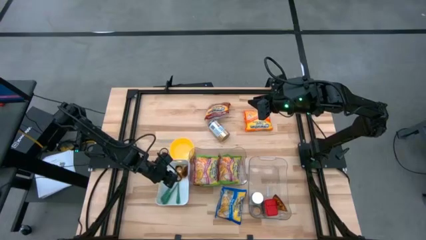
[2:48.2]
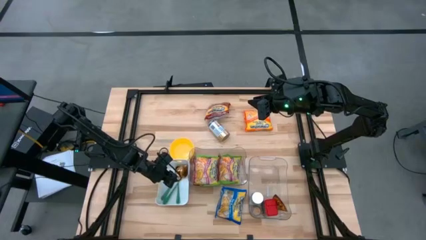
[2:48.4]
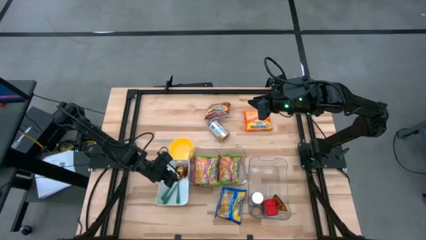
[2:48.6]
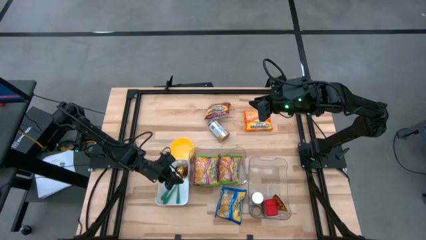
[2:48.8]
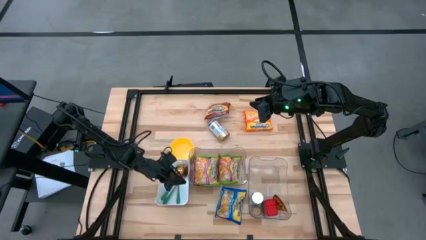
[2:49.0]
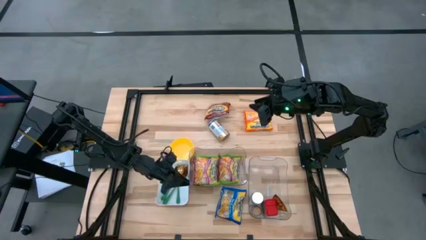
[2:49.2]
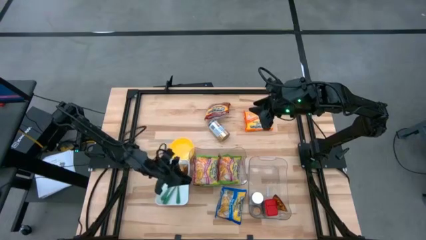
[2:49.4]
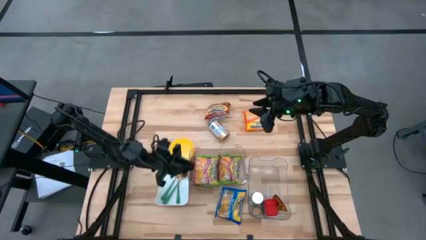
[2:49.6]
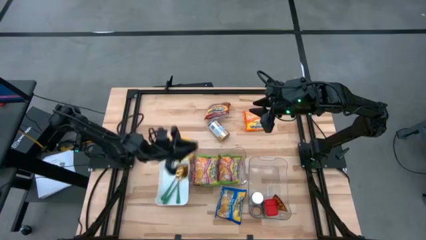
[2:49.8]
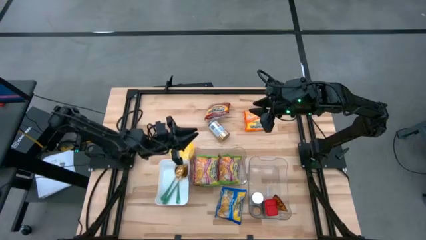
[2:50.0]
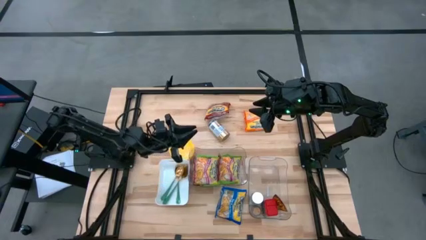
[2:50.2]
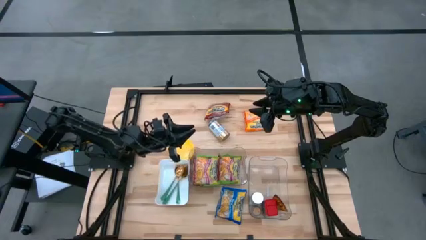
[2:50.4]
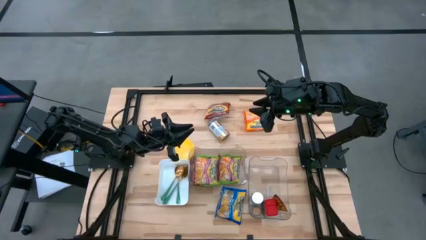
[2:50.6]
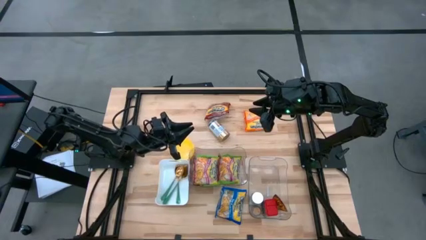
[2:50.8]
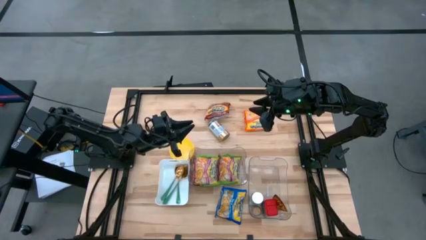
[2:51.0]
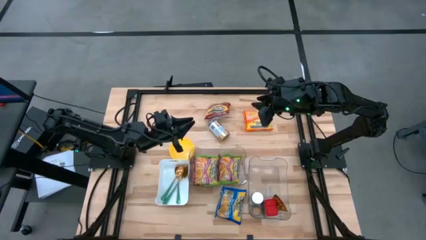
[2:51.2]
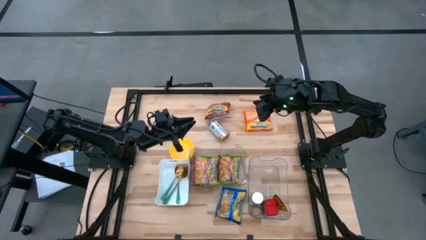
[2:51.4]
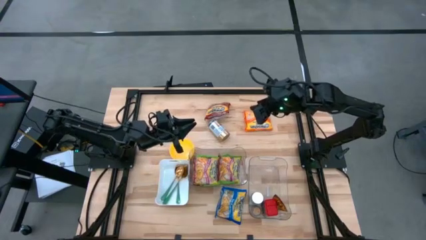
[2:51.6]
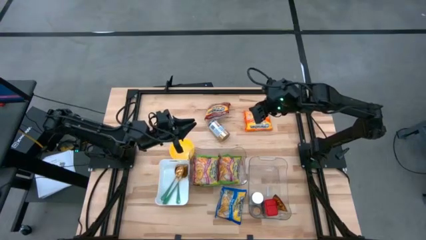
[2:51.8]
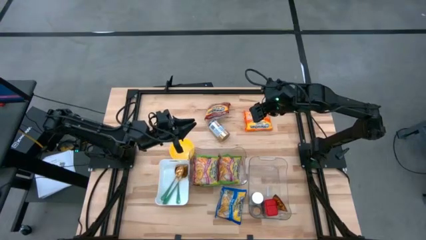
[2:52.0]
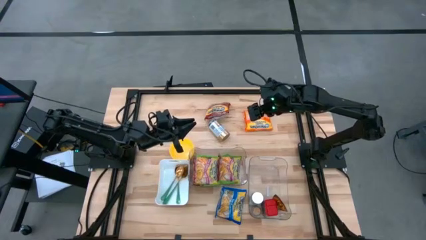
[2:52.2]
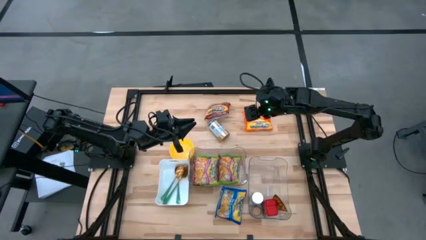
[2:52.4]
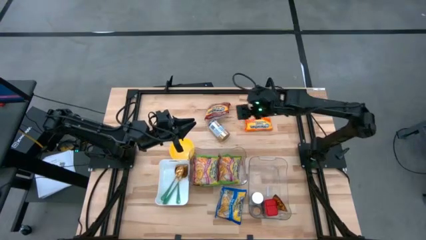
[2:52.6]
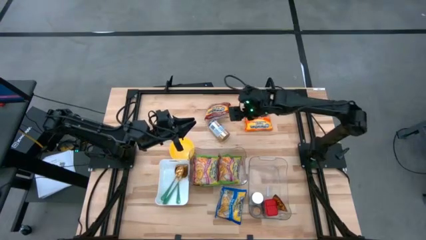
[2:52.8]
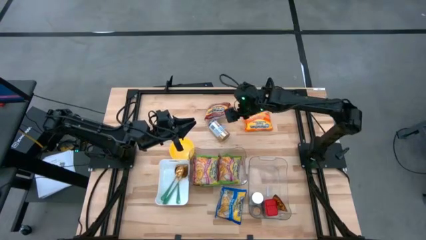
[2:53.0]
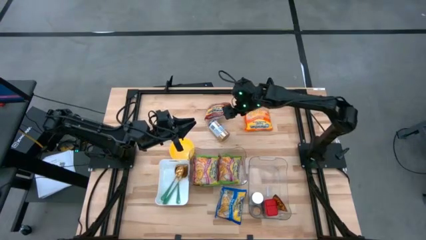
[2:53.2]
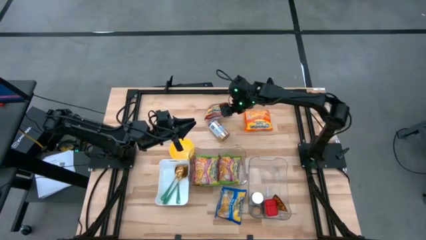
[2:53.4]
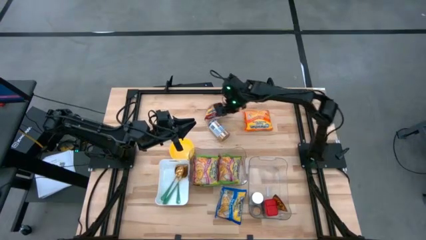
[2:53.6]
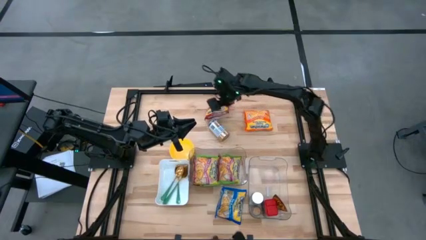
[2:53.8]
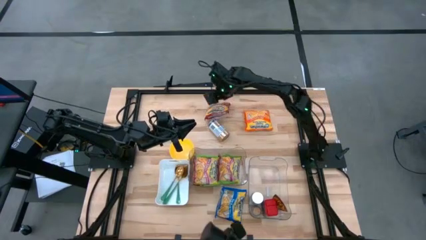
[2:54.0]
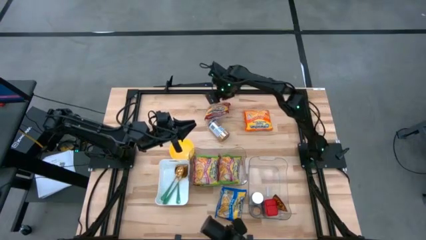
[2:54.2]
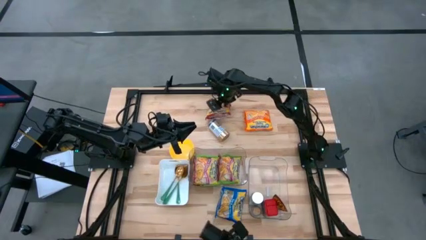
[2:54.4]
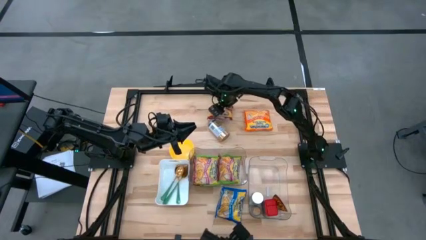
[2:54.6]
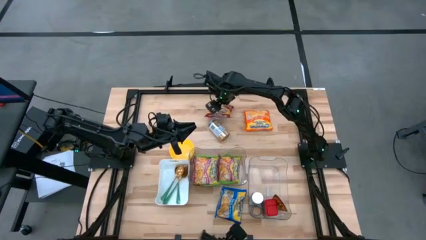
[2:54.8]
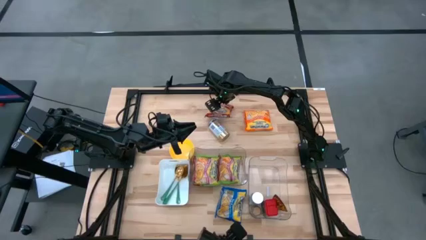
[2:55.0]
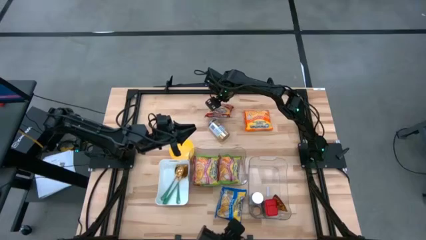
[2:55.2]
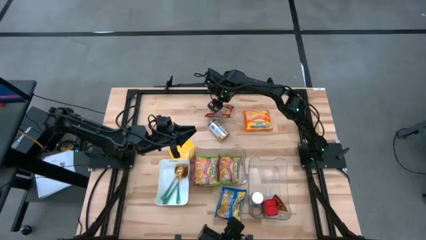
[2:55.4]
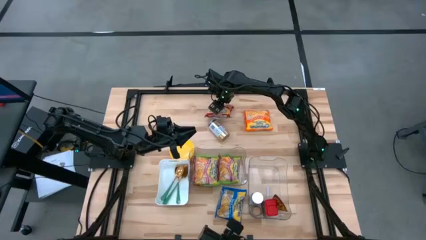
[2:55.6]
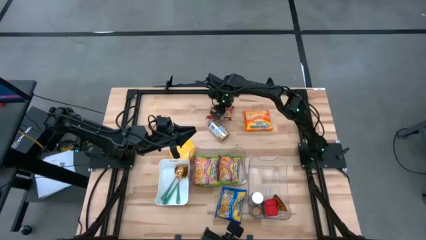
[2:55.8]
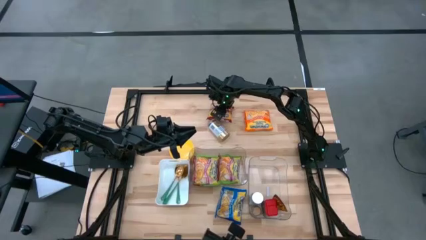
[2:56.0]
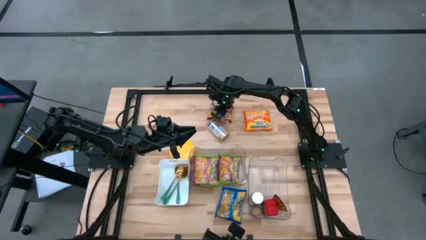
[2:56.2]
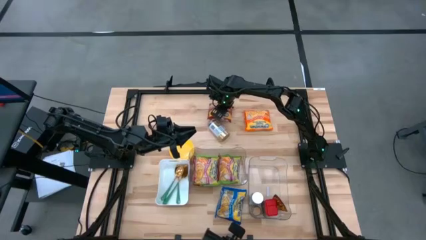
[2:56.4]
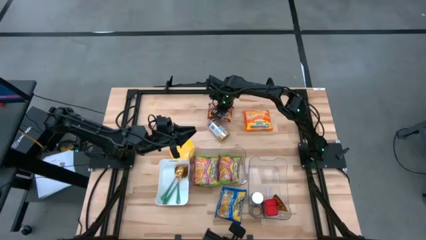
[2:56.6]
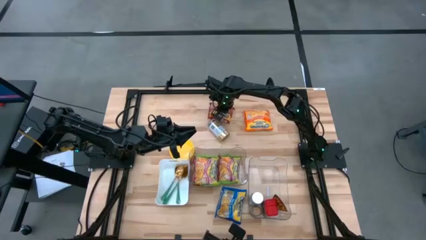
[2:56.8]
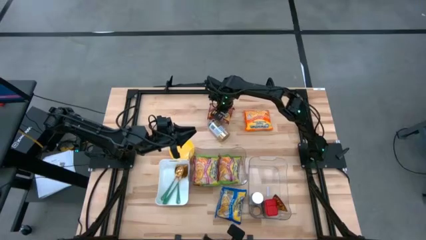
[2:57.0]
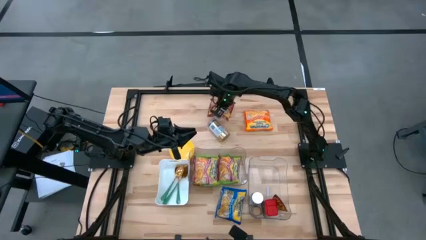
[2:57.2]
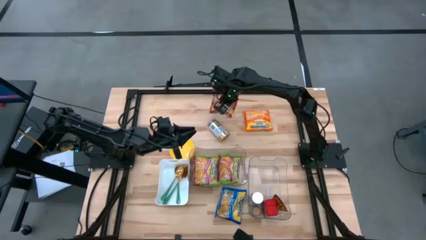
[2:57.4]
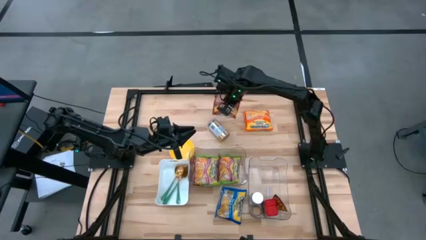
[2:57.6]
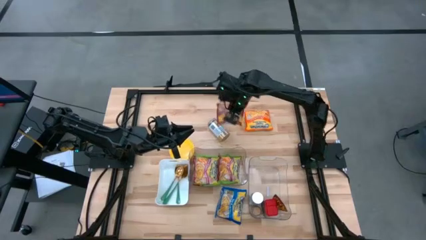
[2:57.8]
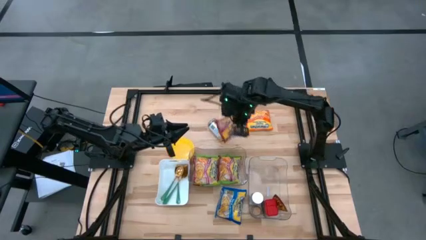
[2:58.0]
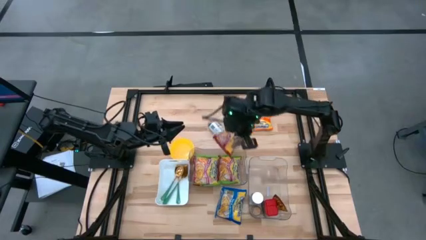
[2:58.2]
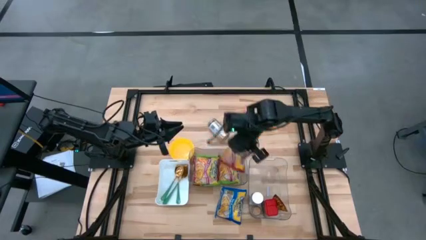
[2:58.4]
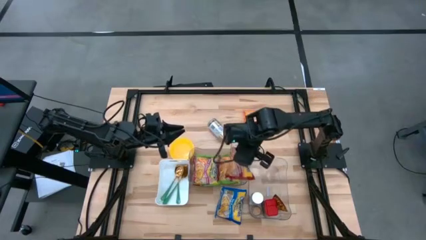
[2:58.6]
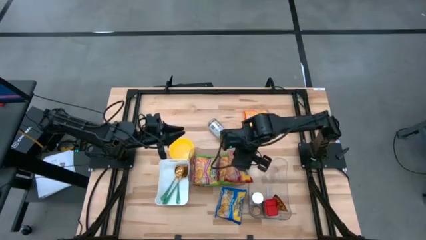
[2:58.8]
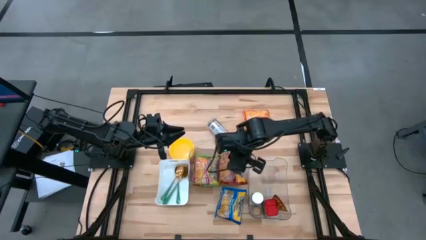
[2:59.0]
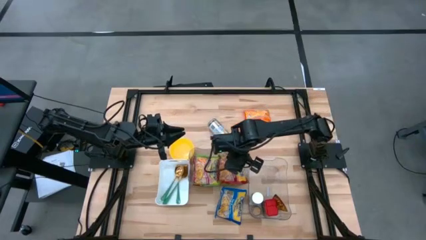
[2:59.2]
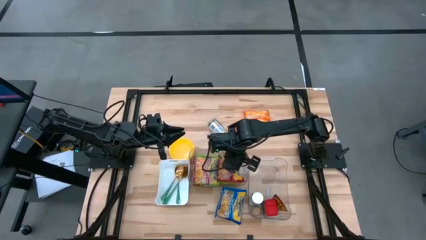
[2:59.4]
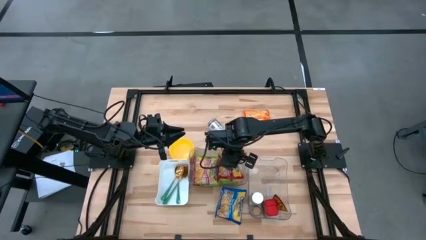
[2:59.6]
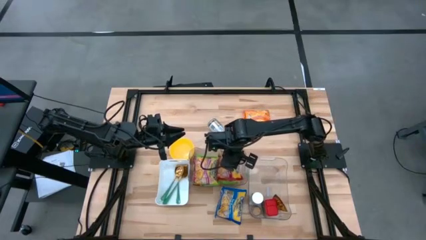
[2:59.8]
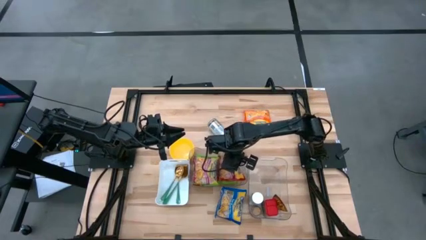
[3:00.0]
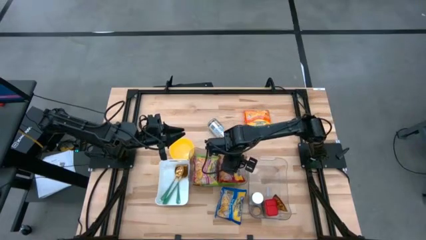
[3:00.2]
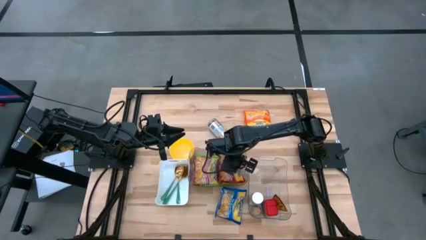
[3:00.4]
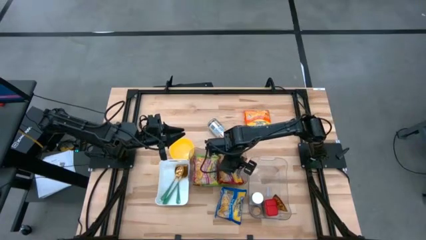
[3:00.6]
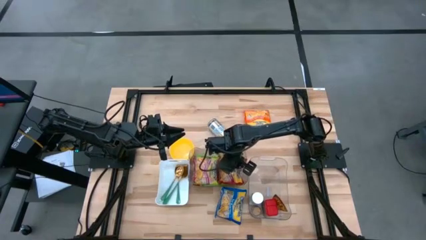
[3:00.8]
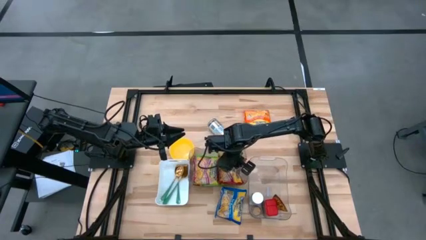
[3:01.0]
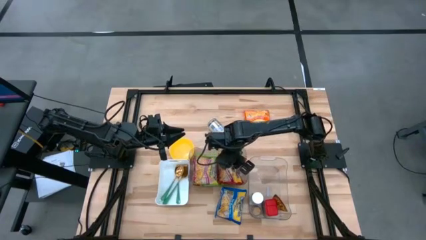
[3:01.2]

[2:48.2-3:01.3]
Task: Pick & Place Food Item
Put the red noodle pack into the left transparent bin

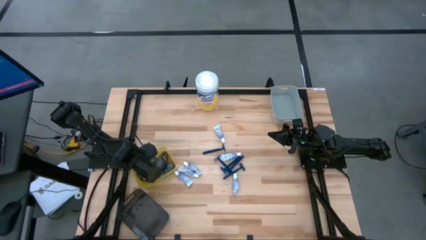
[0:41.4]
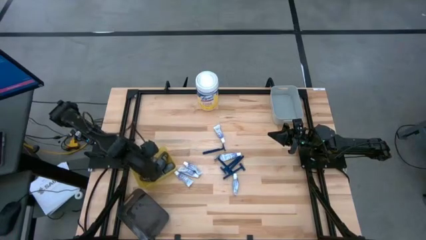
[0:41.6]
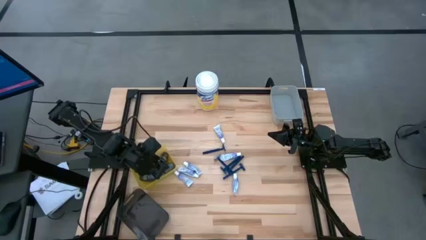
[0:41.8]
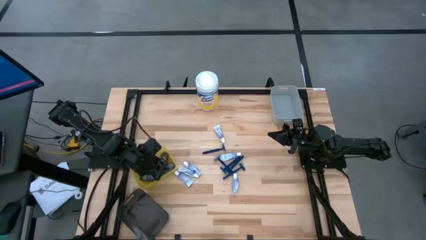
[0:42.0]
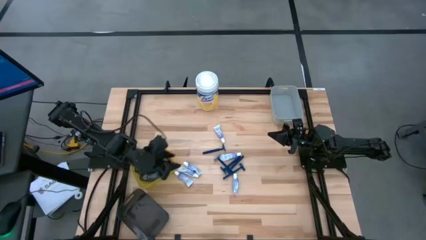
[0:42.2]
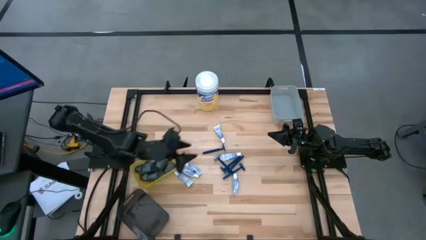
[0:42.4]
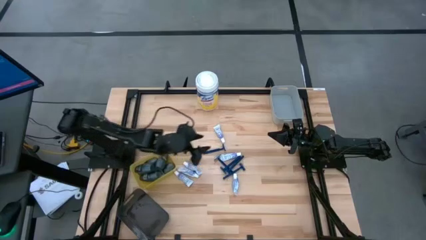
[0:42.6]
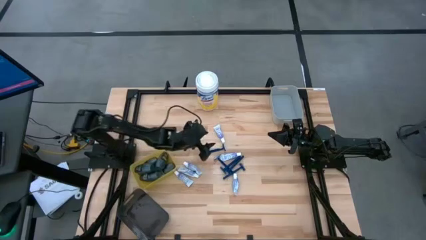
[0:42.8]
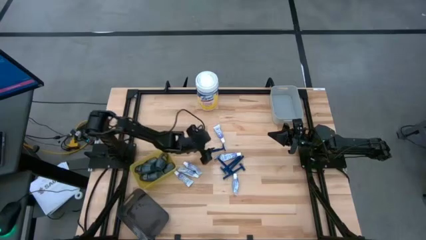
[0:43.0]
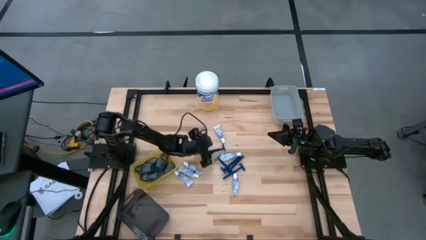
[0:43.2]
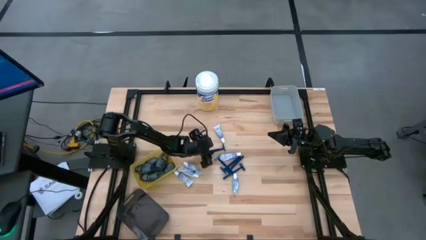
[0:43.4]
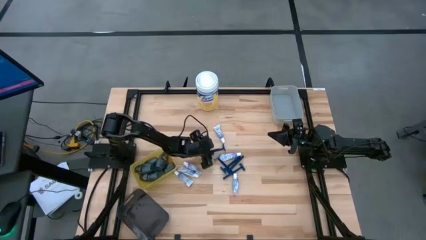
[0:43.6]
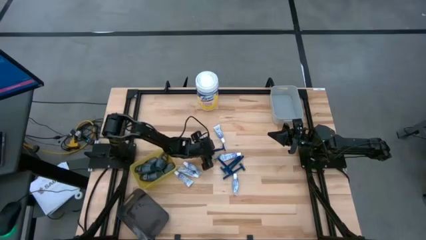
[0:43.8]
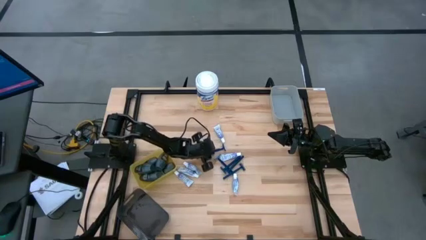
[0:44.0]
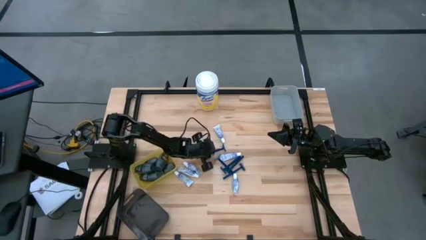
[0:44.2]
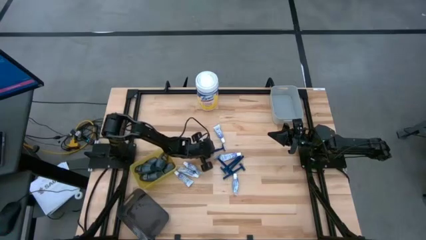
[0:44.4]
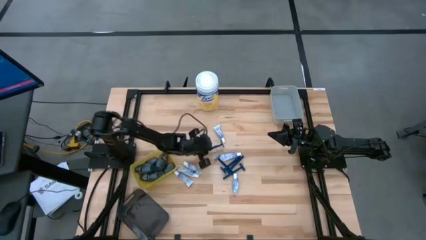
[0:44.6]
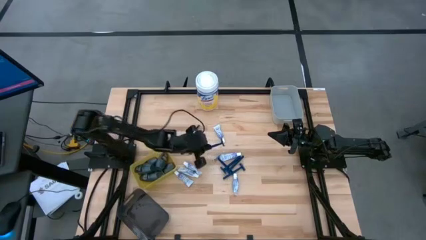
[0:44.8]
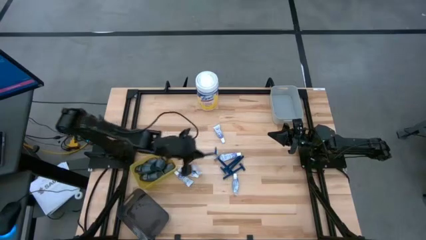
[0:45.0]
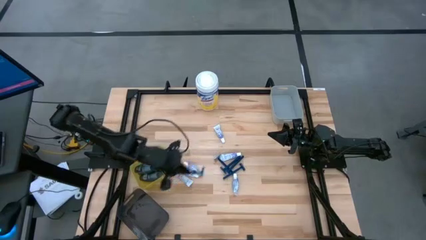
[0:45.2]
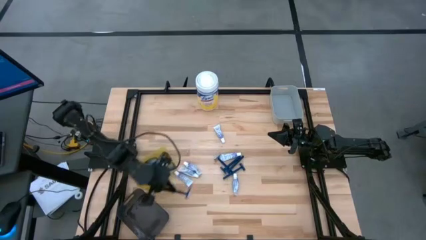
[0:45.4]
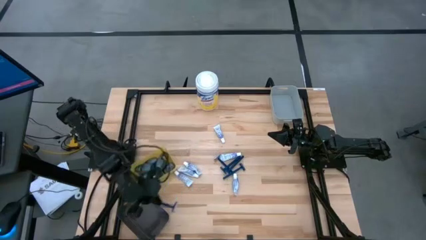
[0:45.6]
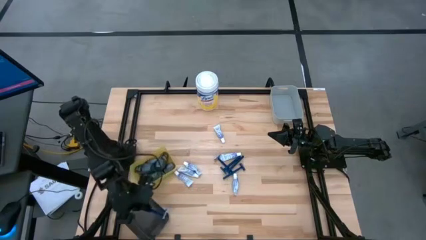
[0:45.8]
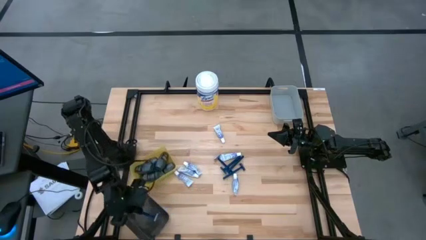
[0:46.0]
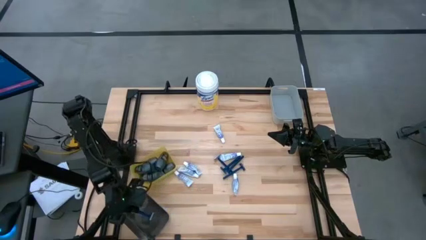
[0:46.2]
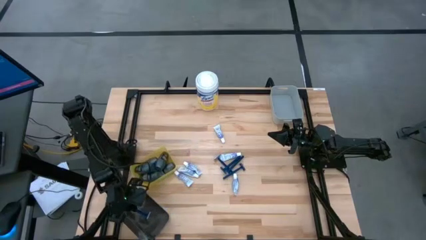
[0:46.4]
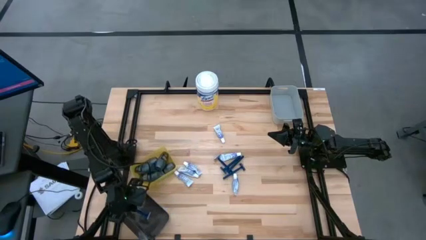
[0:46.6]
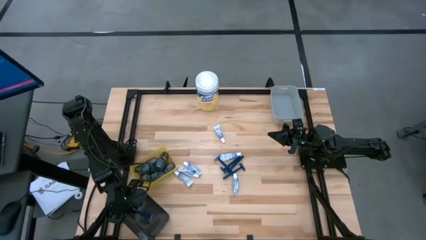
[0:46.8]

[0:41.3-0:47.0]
Task: Pick & Place Travel size toiletries
Put the dark blue razor into the black bin
